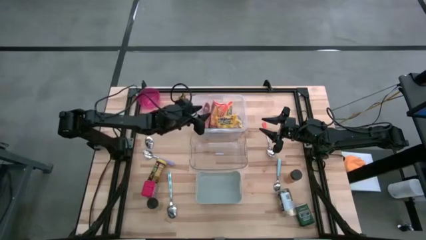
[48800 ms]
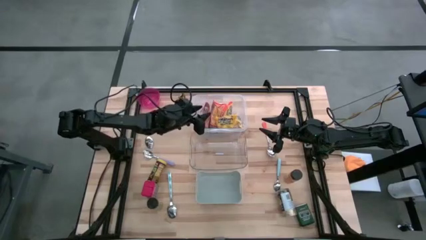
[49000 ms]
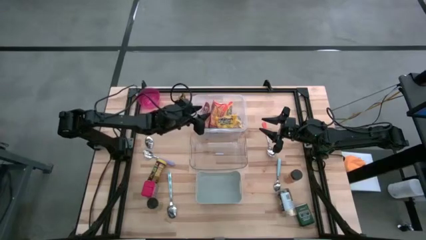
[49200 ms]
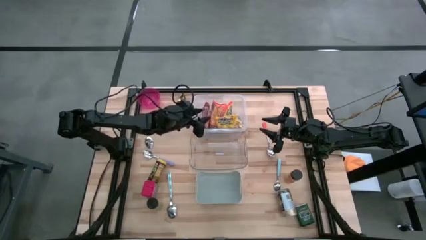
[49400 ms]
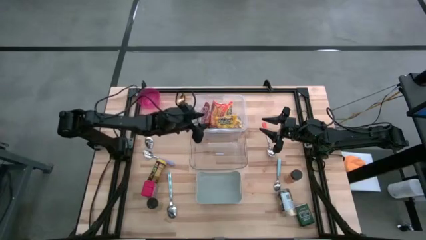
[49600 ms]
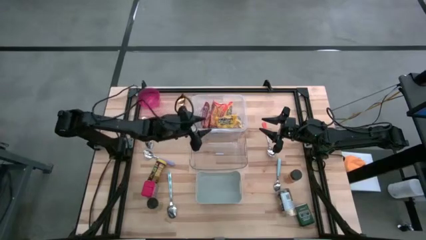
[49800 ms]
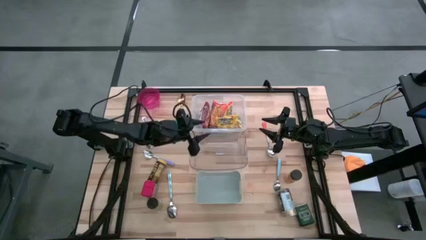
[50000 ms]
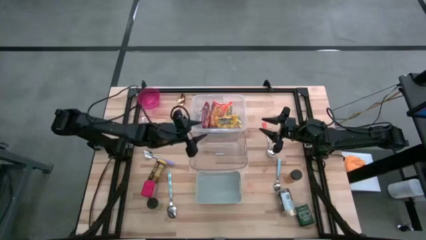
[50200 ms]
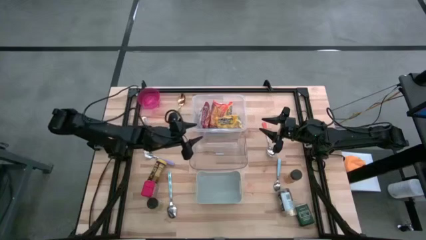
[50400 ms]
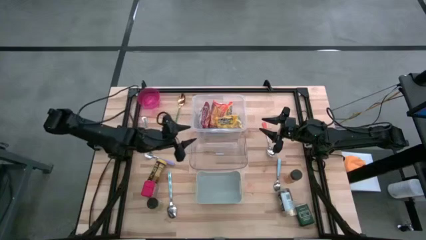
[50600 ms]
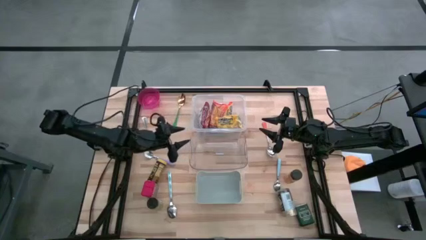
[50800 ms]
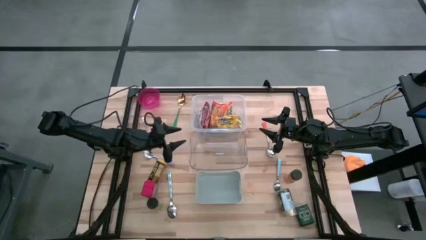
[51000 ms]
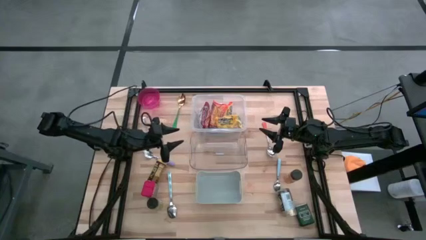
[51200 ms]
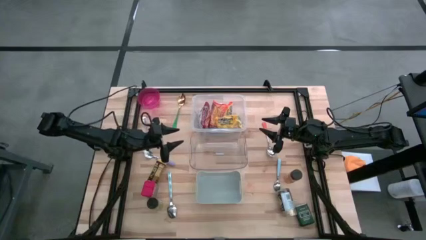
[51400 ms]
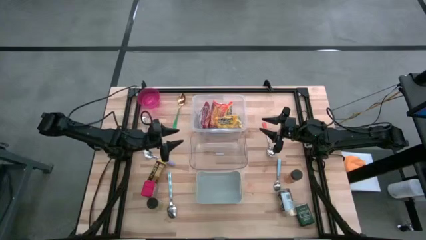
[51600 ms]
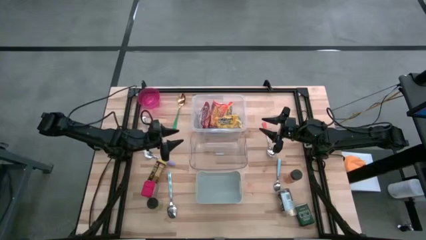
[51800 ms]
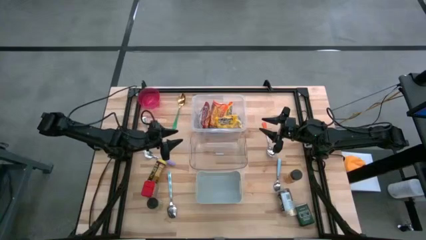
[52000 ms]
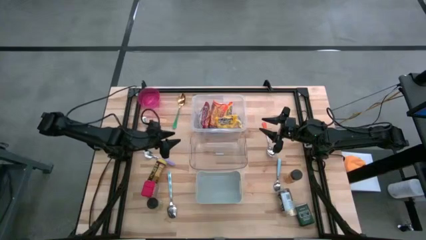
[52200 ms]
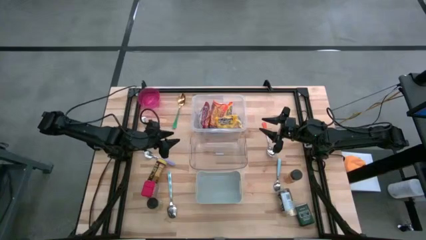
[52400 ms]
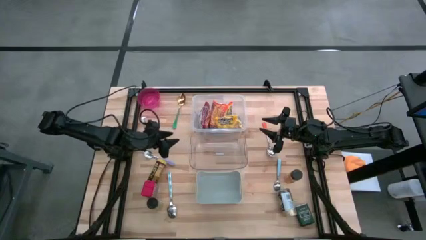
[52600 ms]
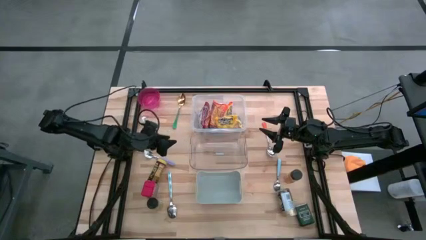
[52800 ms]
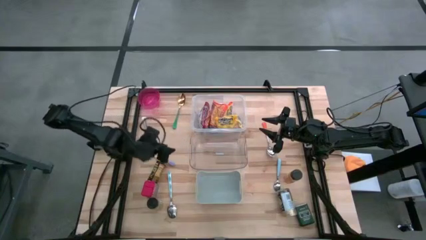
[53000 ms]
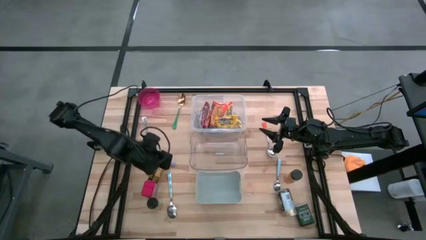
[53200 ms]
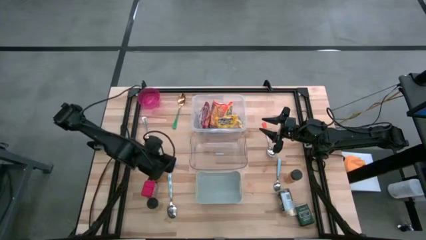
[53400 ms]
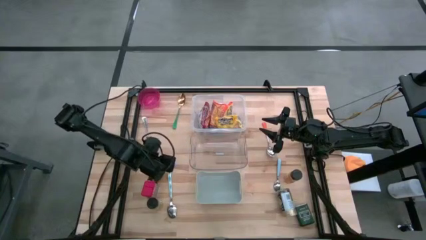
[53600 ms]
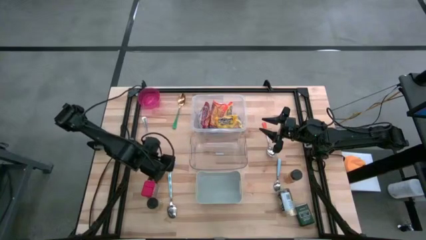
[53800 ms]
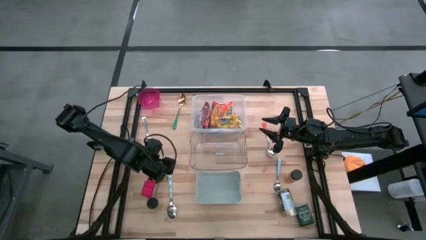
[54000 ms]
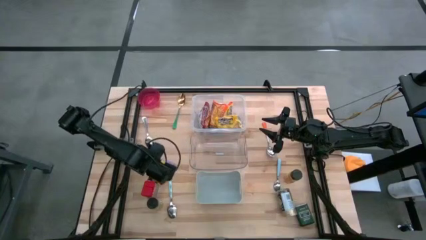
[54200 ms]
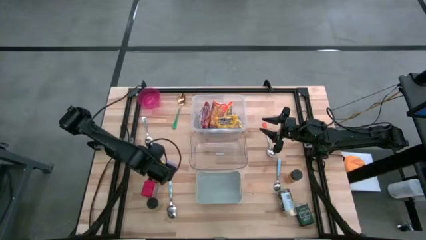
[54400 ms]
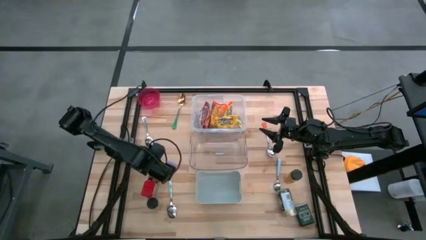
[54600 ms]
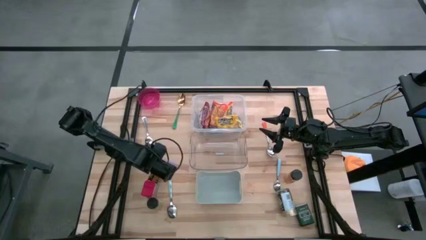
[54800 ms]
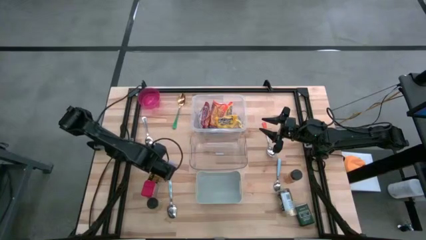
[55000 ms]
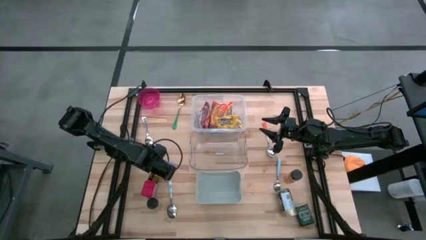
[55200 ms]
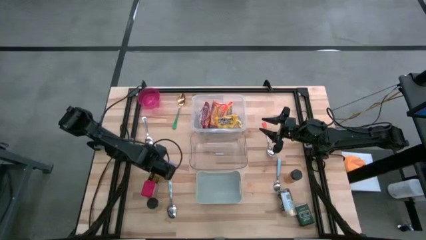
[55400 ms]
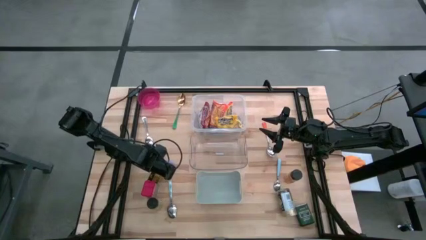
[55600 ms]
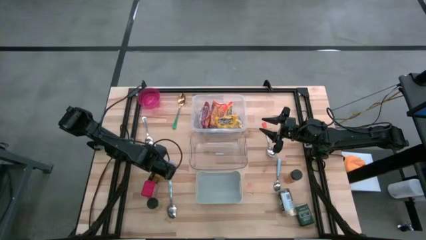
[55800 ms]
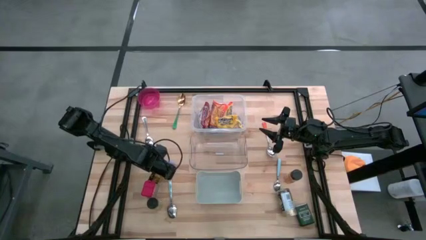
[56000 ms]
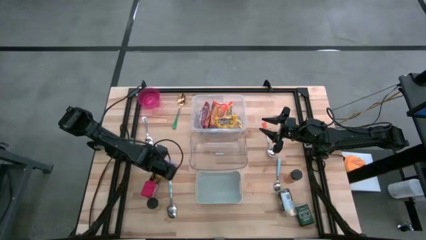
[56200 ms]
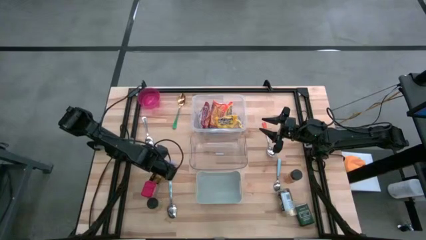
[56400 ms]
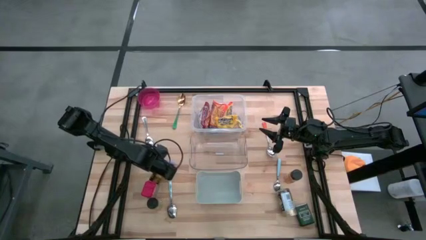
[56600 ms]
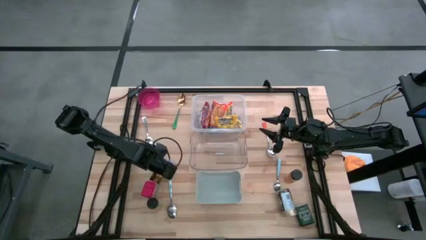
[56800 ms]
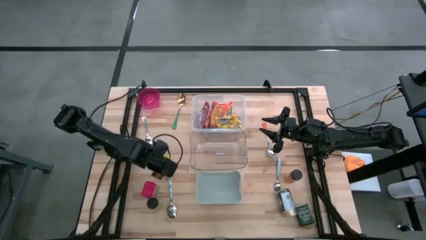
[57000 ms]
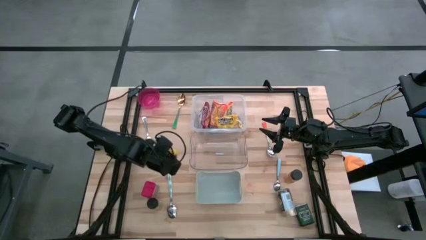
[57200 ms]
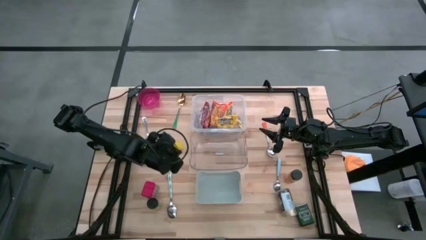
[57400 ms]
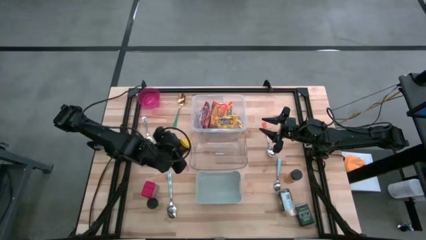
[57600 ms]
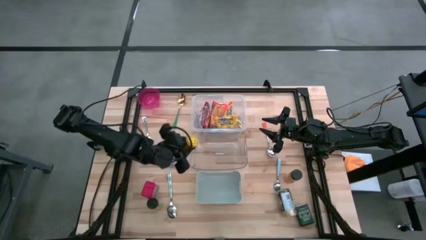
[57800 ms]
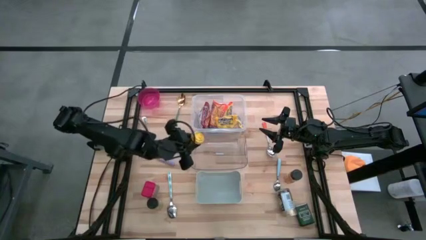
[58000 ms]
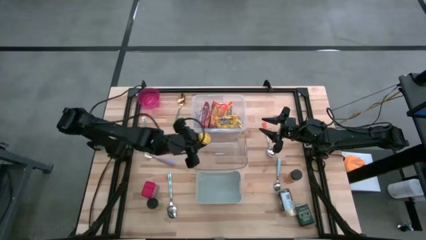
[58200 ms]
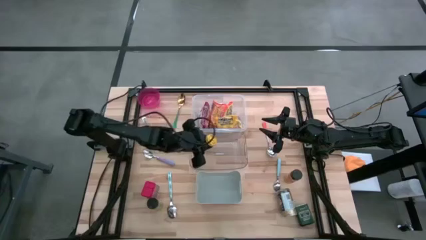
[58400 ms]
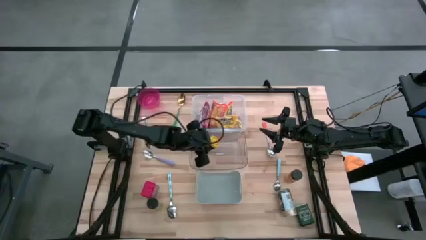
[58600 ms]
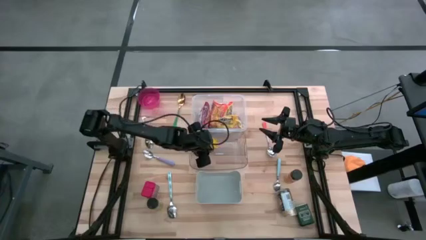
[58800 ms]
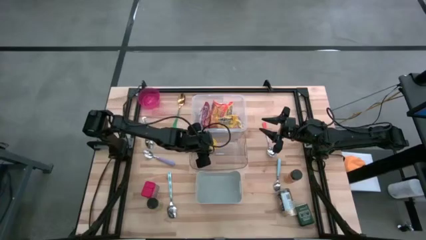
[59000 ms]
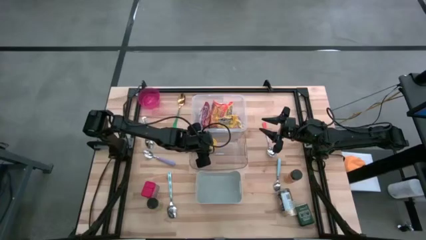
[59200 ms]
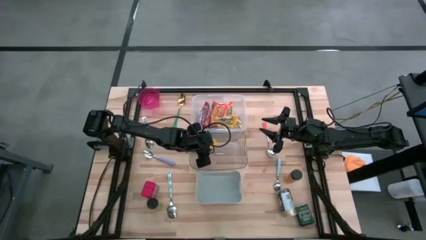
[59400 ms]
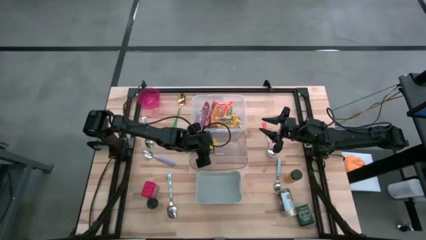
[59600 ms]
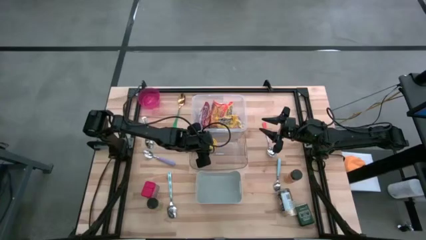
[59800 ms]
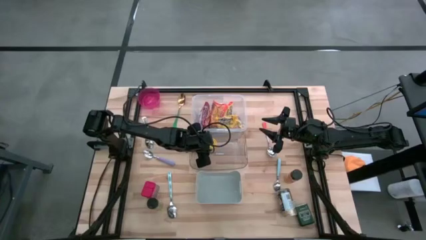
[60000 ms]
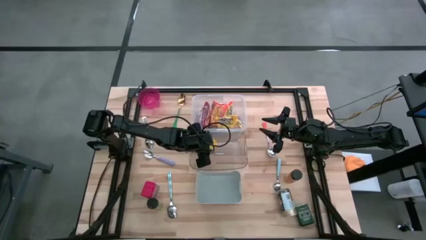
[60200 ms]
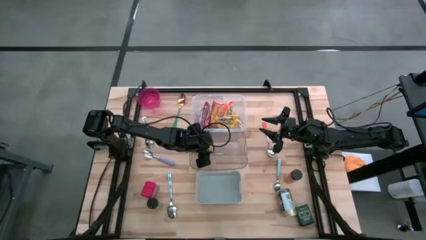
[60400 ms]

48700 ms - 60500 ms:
Put the yellow spice bottle into the transparent bin
